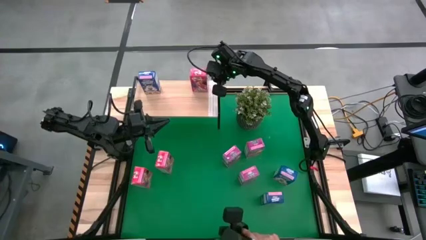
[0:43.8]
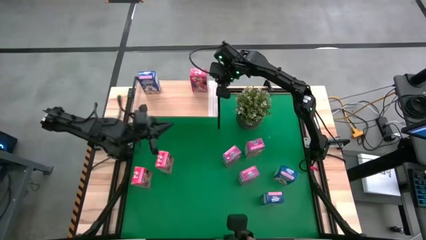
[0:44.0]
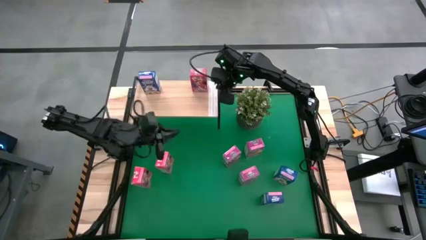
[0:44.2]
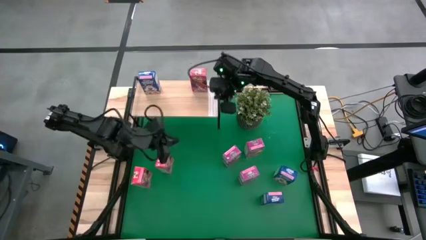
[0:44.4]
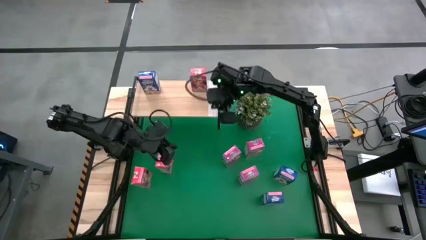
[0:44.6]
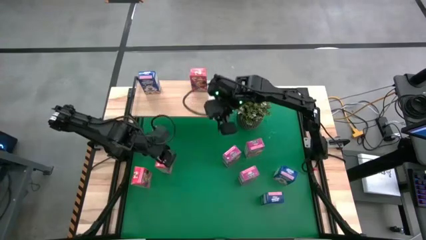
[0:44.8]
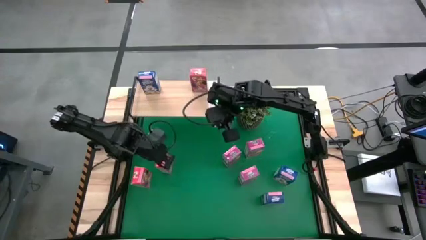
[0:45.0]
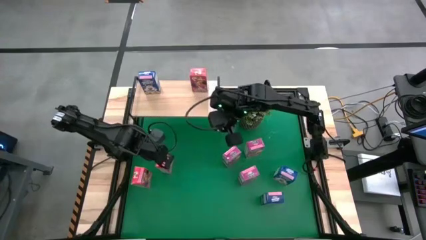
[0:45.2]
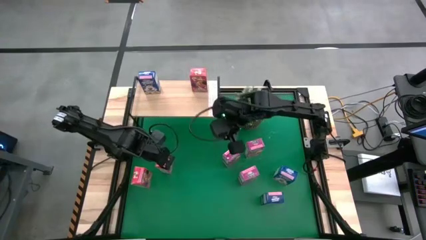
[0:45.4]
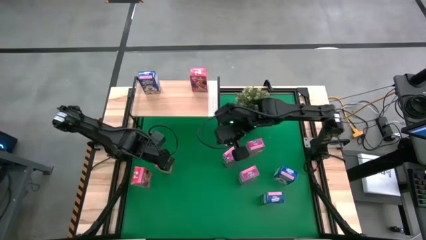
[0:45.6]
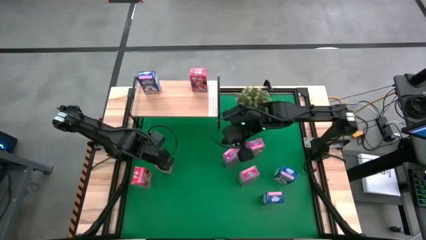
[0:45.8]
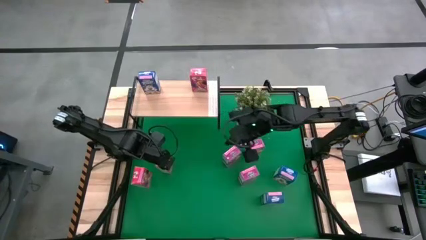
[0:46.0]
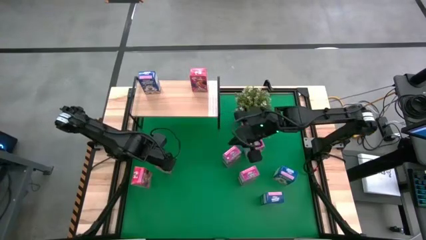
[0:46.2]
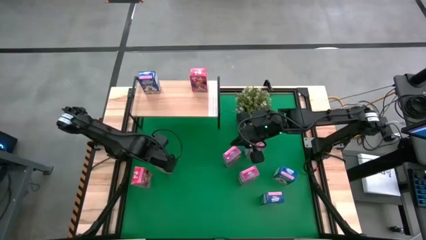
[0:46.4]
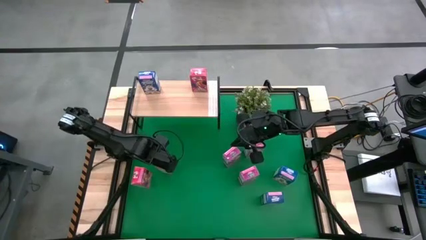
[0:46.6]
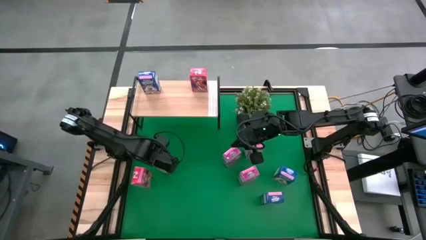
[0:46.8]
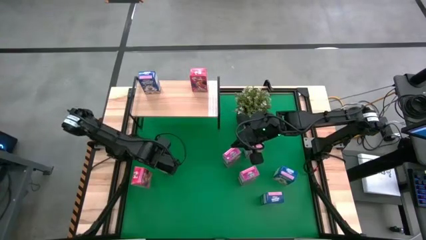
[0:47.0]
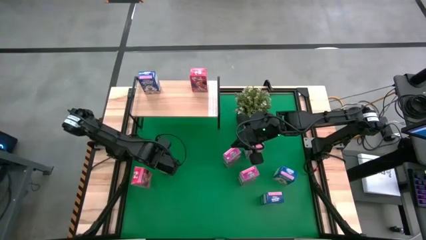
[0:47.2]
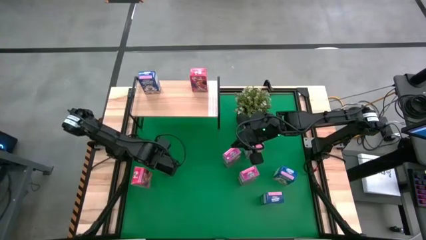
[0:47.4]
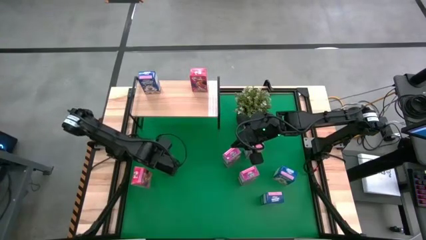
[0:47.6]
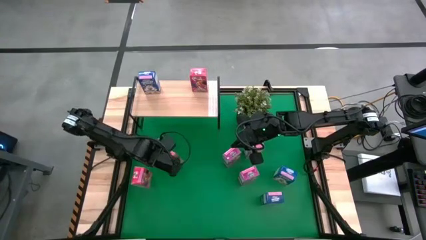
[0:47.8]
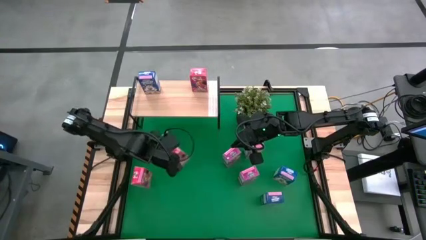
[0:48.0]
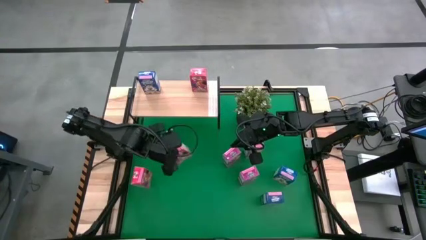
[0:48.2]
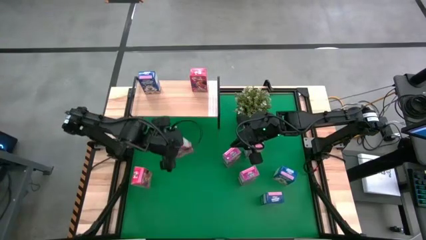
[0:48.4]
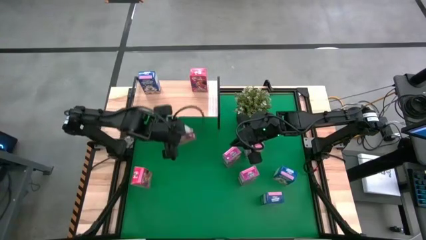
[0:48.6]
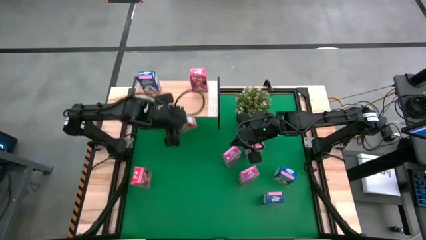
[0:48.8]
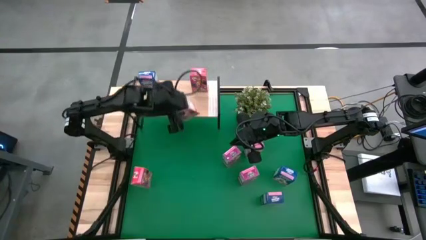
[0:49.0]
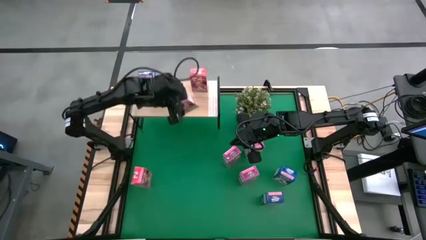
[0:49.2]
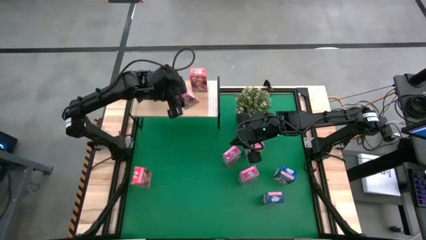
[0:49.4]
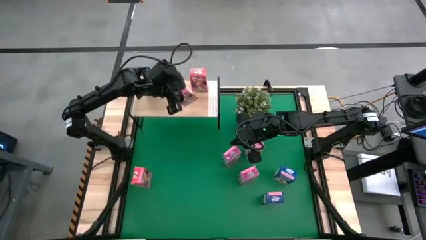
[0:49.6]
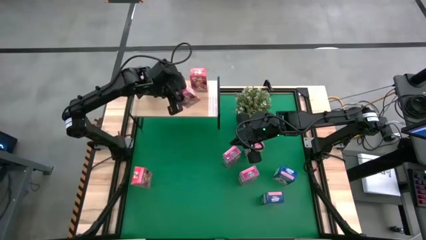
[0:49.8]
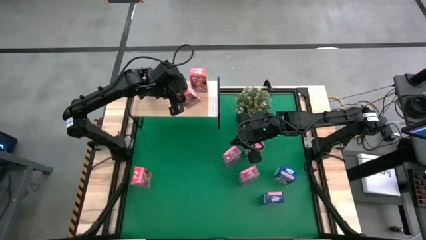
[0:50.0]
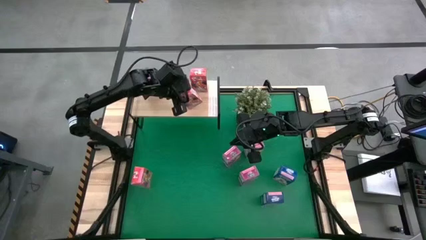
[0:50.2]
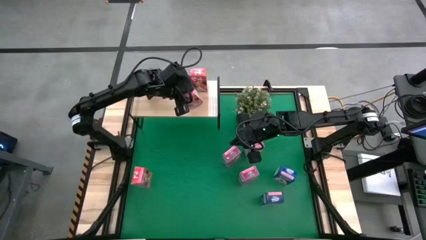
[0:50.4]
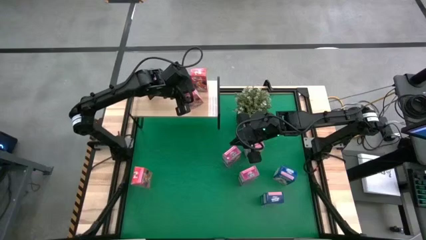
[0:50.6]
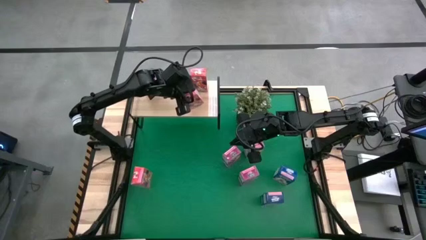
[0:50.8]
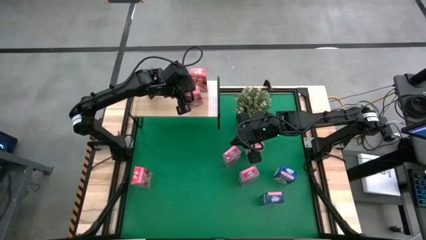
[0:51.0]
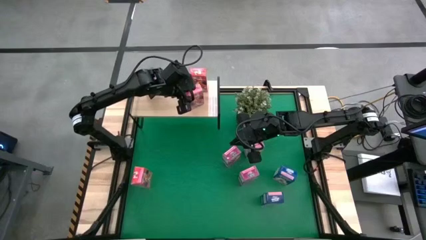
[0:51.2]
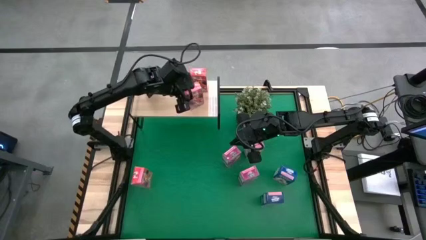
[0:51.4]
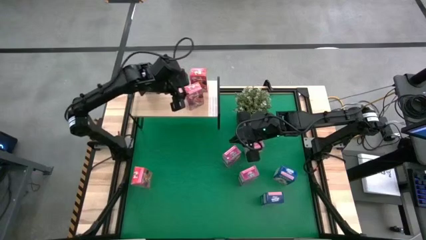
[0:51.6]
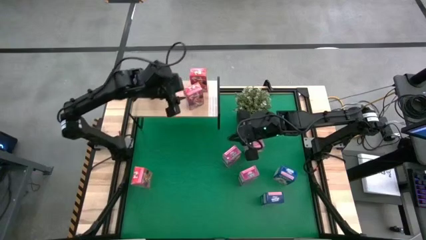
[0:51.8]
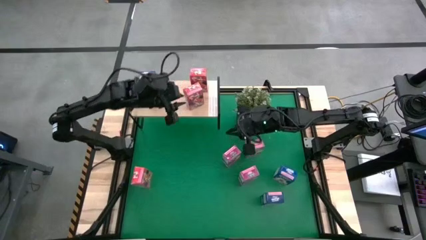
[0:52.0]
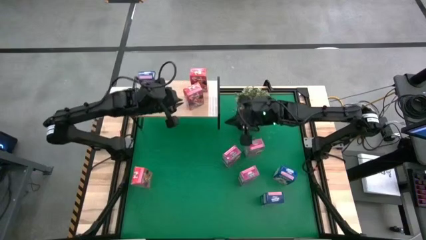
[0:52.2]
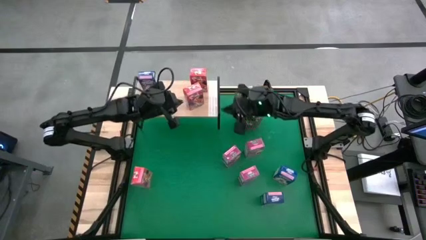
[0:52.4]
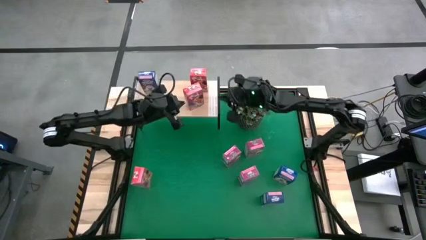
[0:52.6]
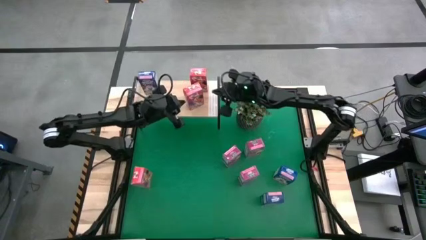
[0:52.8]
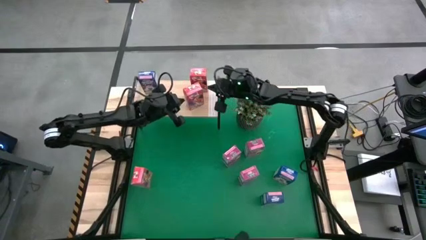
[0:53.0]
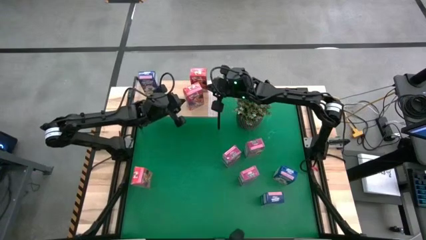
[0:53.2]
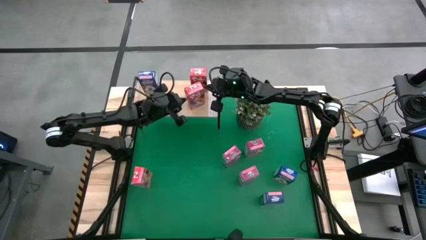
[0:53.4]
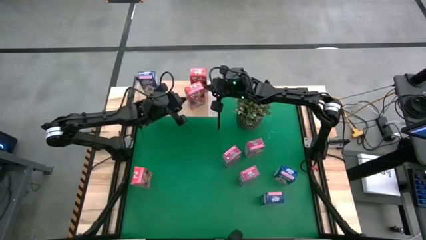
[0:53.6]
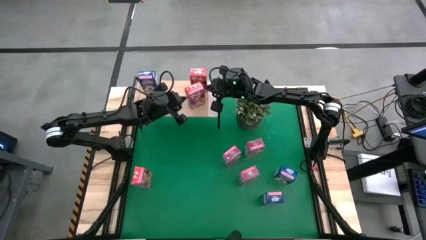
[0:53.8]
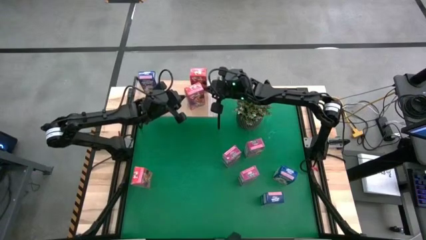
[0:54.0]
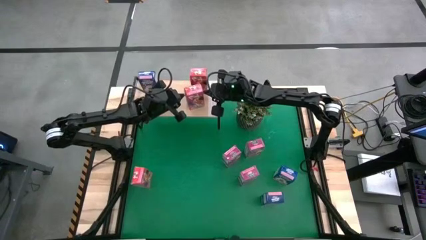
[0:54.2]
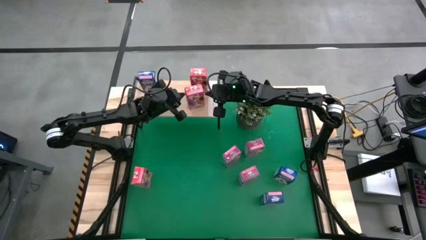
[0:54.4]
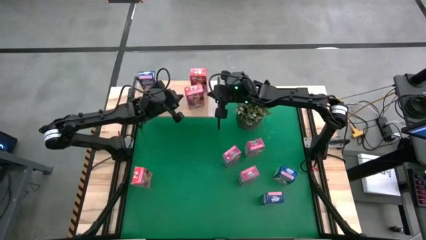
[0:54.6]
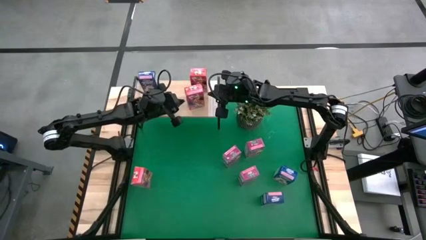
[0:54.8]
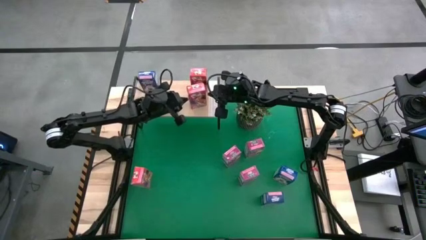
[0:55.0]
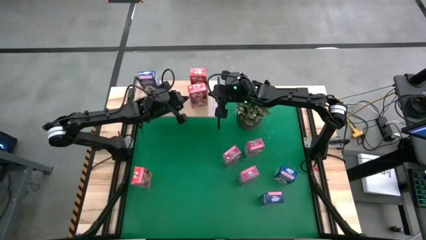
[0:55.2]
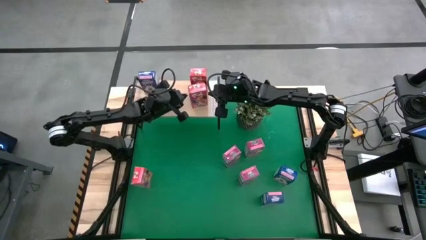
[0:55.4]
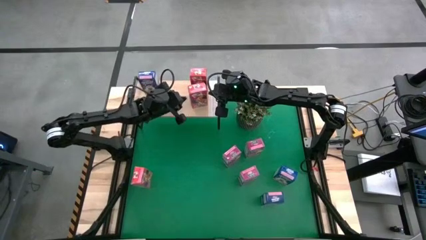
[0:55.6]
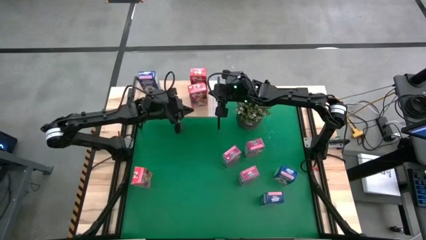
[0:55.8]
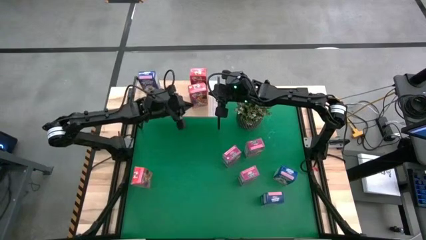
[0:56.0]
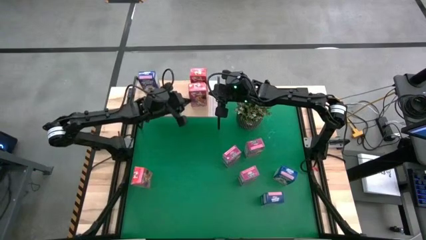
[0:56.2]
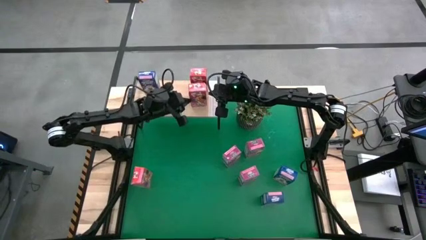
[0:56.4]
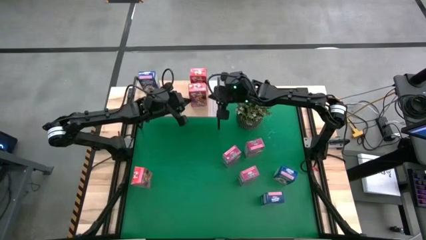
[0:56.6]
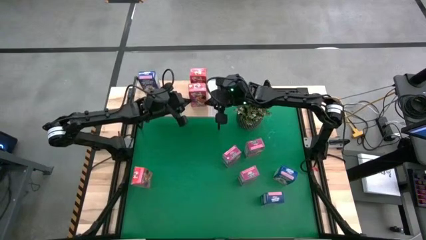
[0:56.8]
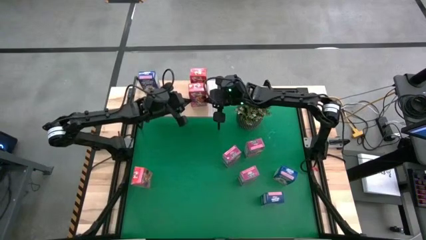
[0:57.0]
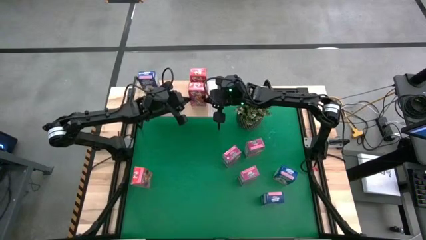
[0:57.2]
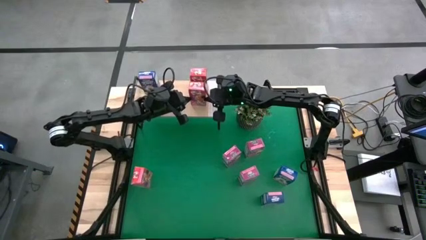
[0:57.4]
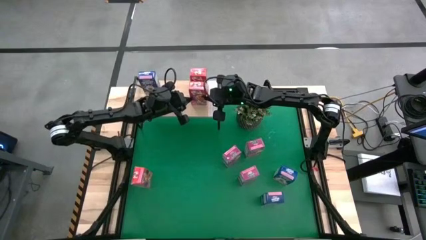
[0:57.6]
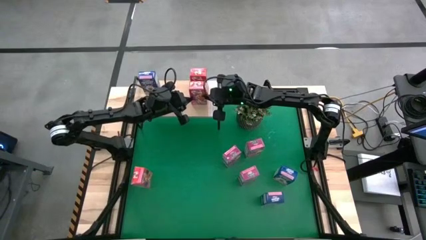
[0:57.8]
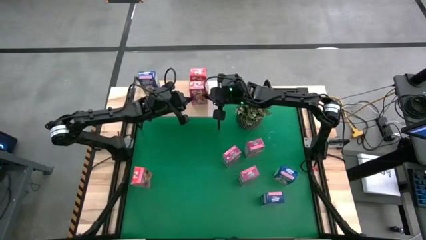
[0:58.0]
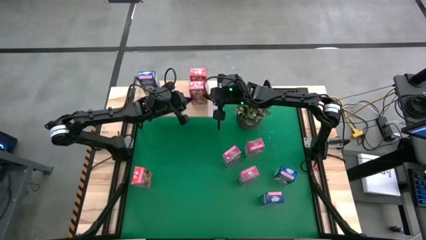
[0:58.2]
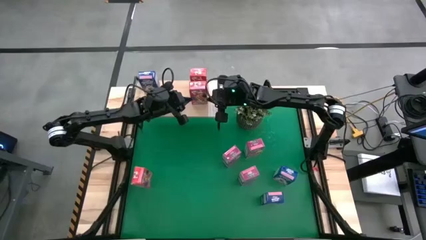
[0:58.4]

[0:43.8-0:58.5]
Task: Stack cereal on shelf
Put the right red cereal box on the shelf

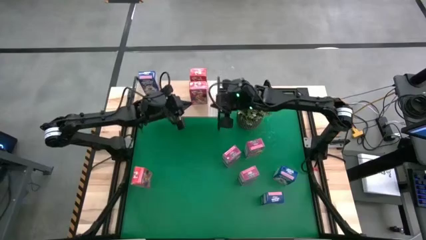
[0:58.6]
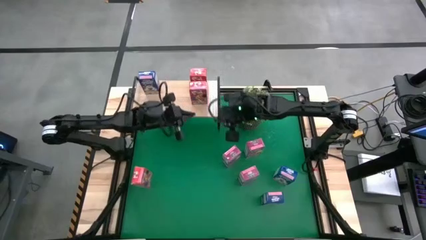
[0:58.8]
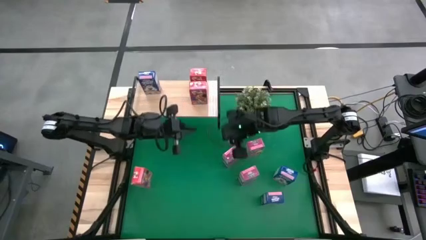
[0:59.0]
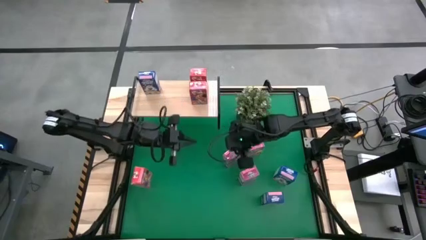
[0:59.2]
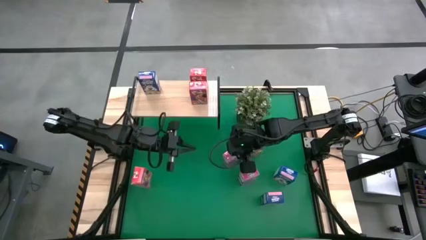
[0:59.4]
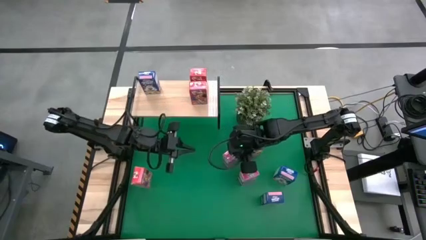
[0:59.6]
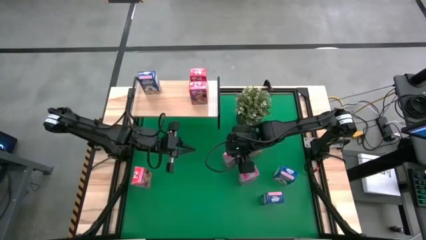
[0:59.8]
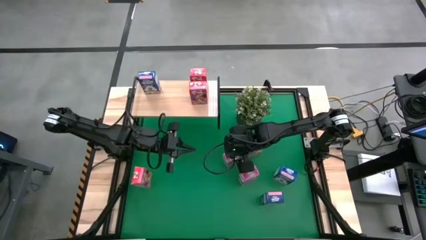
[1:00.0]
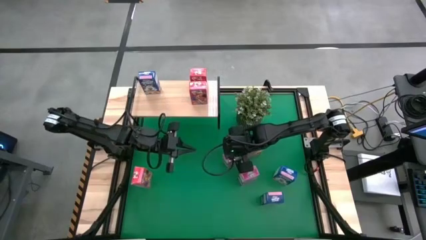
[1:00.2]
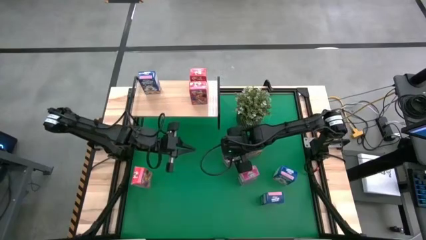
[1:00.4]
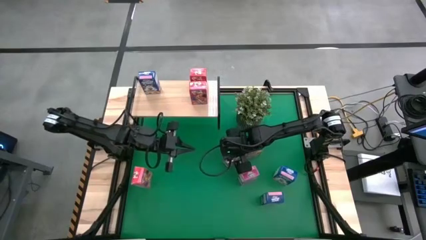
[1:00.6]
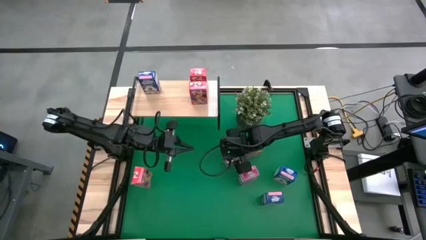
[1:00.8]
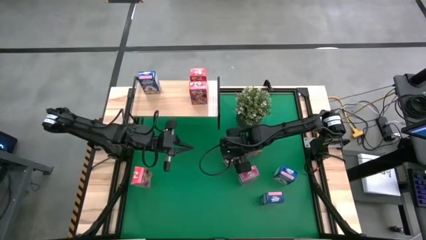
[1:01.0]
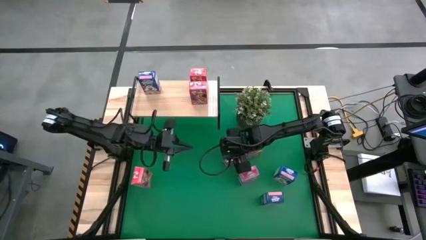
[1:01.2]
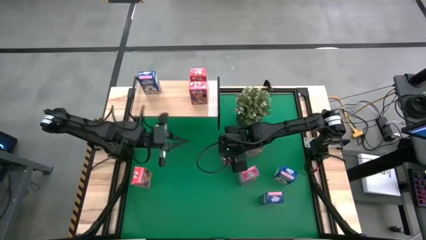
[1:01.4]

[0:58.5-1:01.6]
Put the left pink cereal box on the shelf
